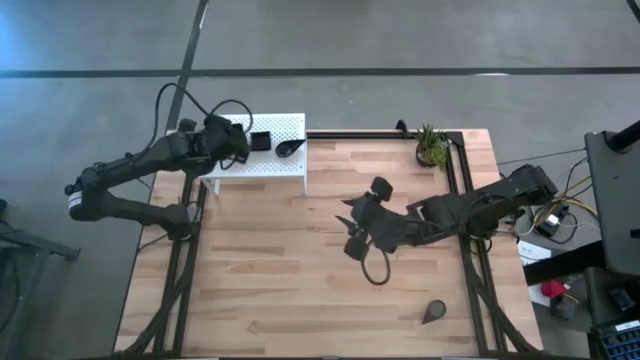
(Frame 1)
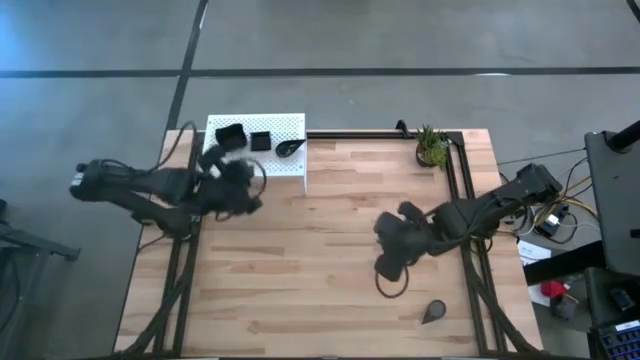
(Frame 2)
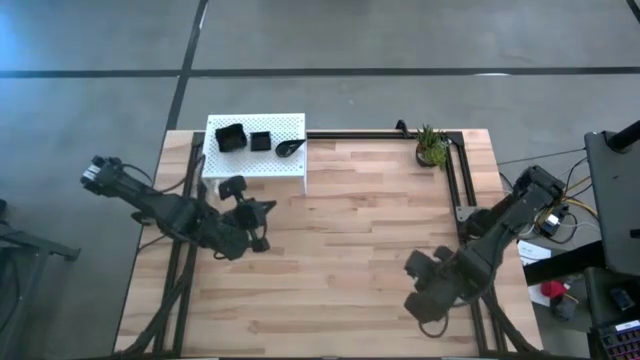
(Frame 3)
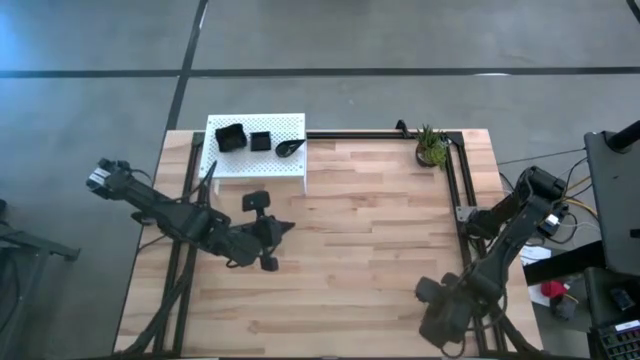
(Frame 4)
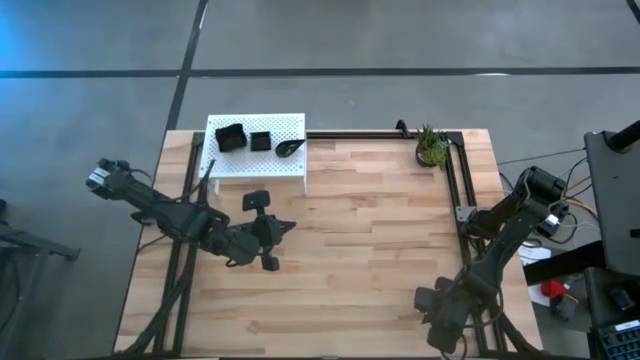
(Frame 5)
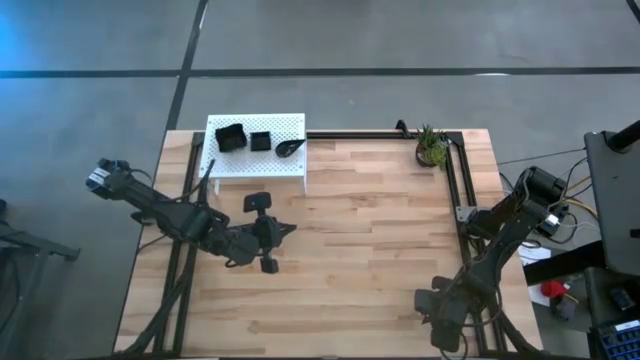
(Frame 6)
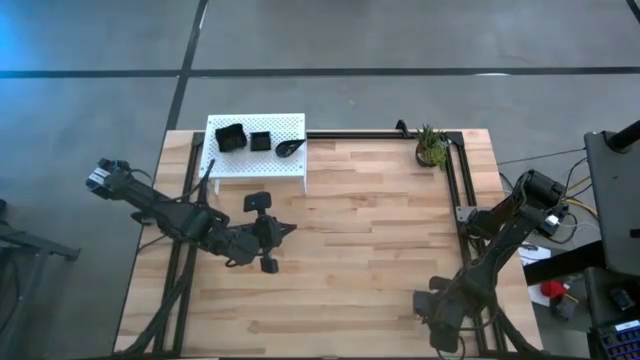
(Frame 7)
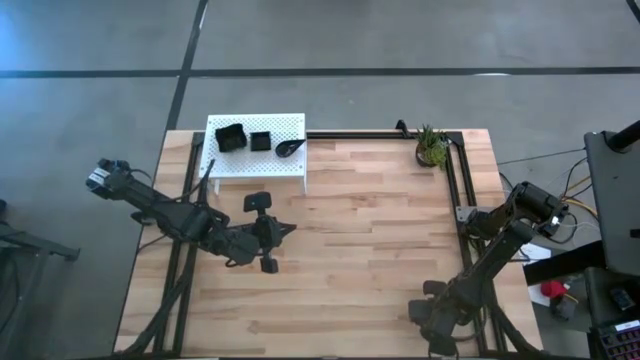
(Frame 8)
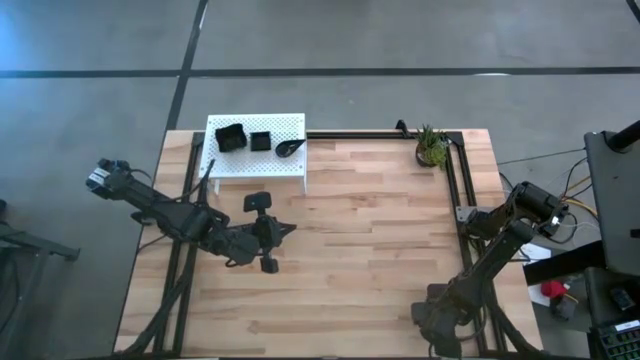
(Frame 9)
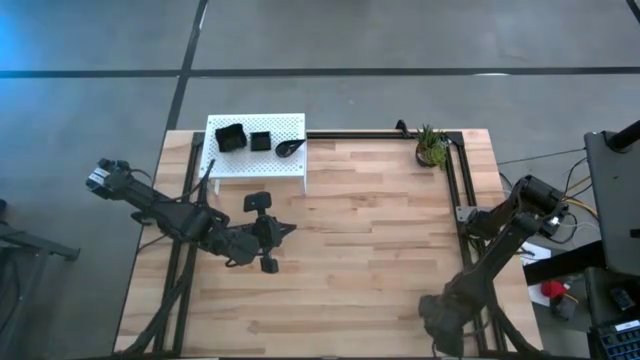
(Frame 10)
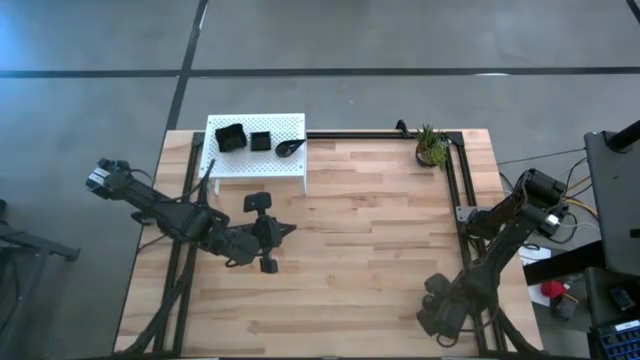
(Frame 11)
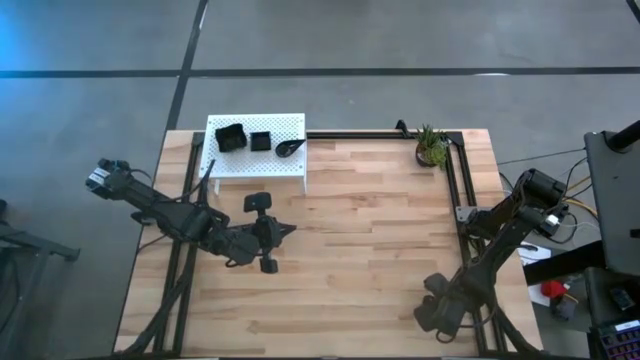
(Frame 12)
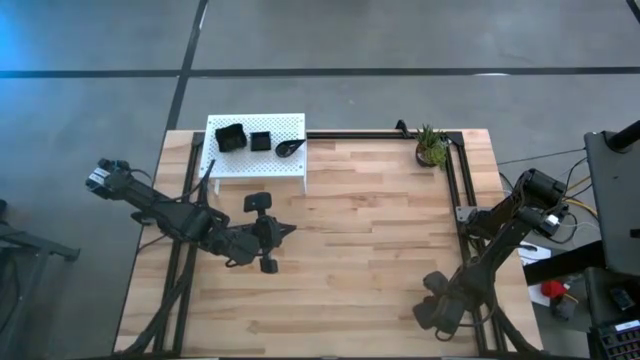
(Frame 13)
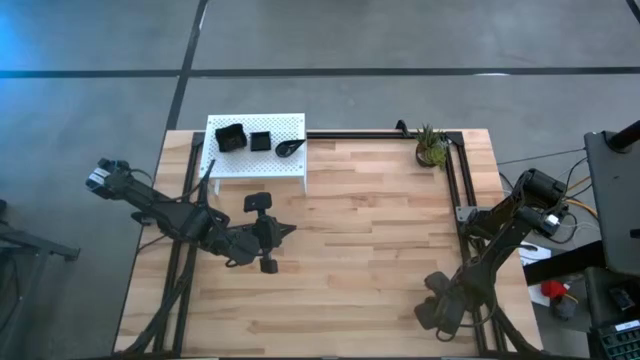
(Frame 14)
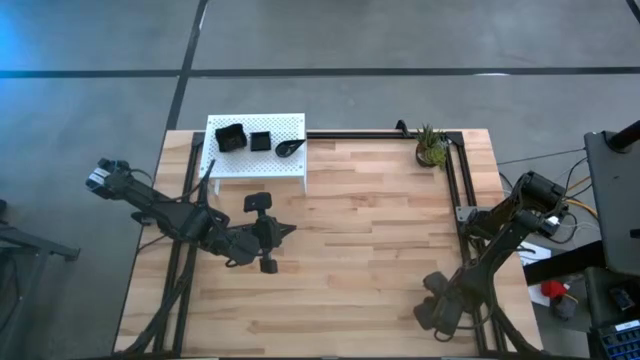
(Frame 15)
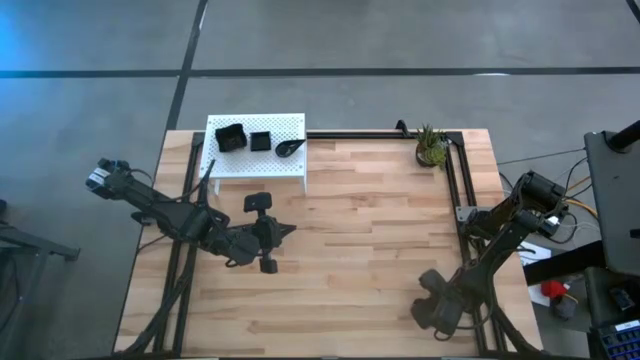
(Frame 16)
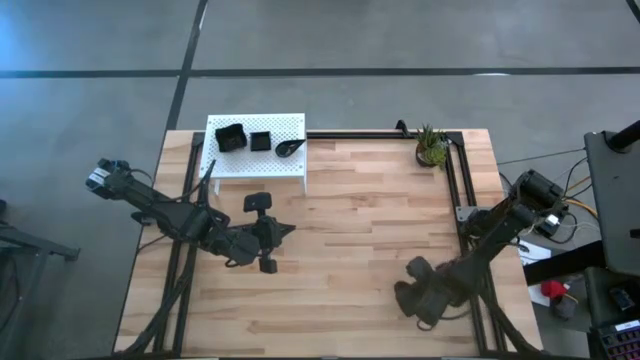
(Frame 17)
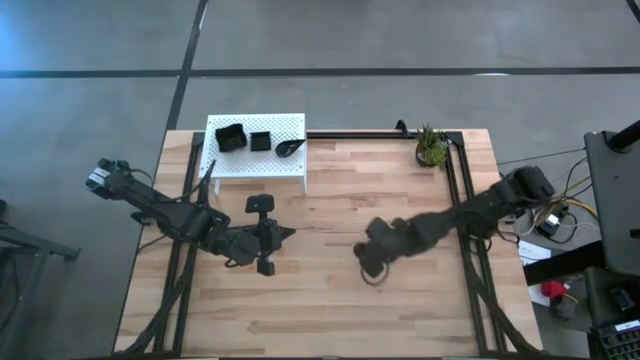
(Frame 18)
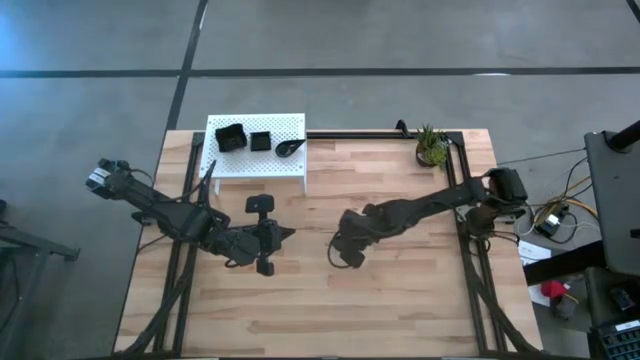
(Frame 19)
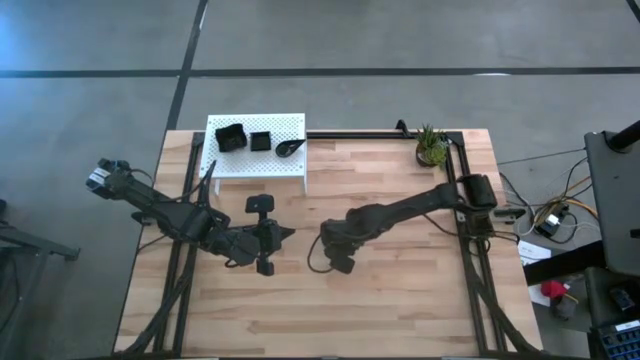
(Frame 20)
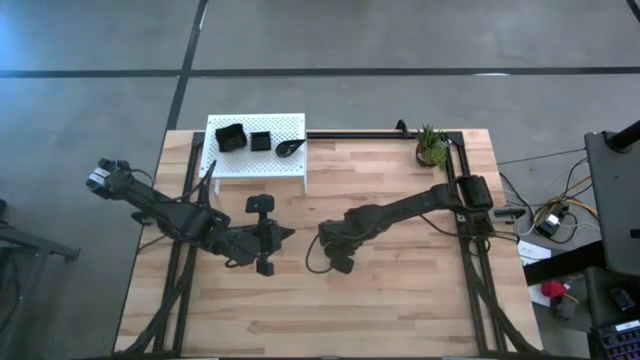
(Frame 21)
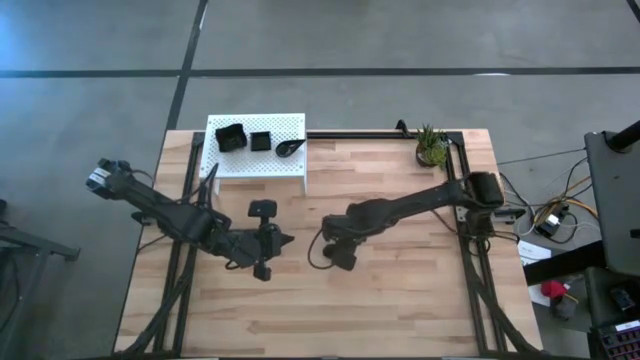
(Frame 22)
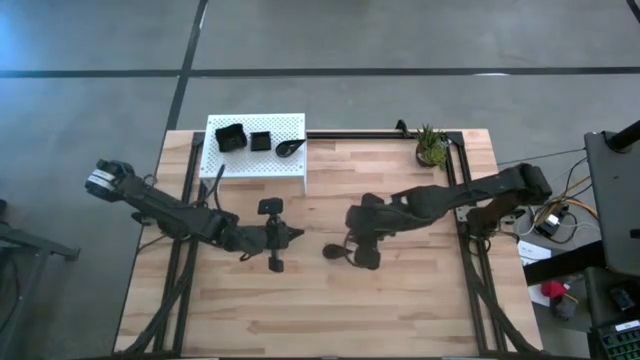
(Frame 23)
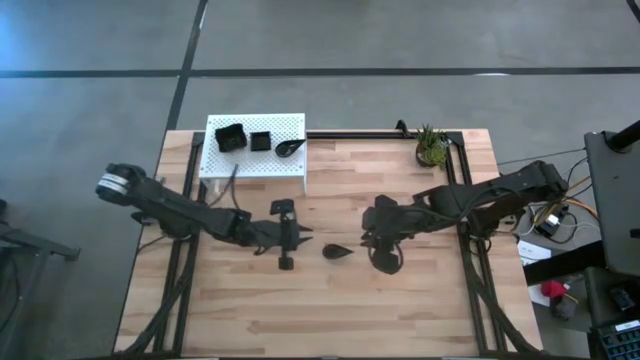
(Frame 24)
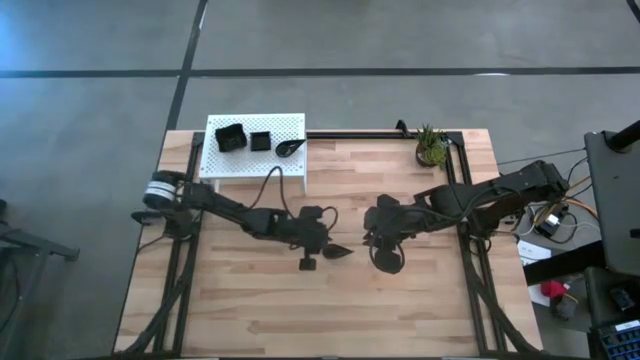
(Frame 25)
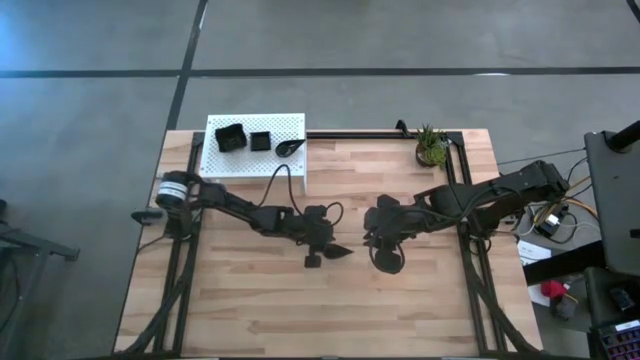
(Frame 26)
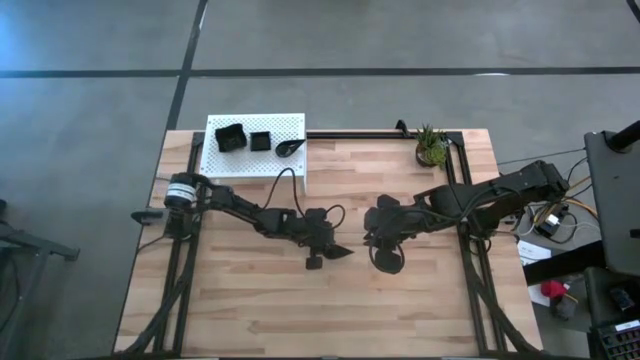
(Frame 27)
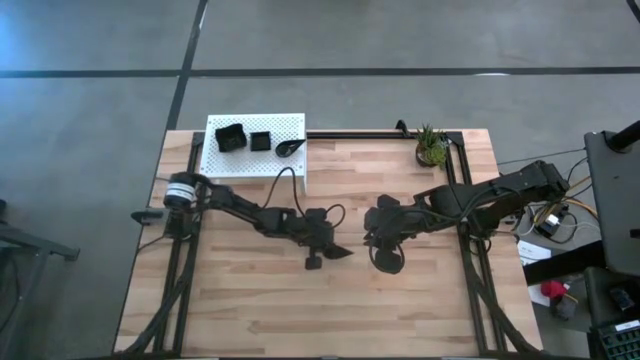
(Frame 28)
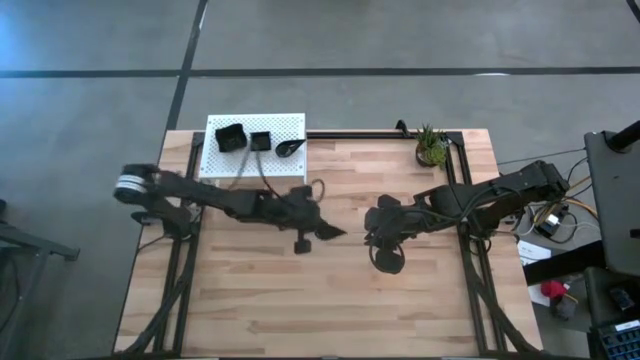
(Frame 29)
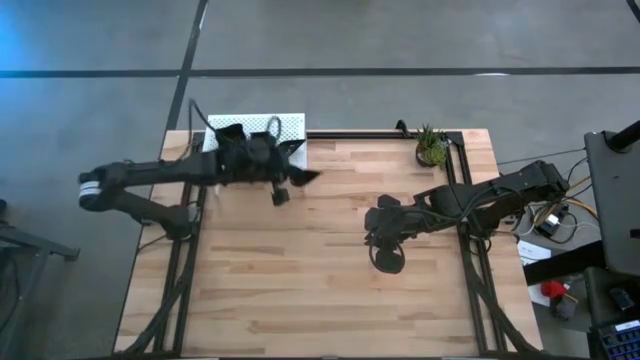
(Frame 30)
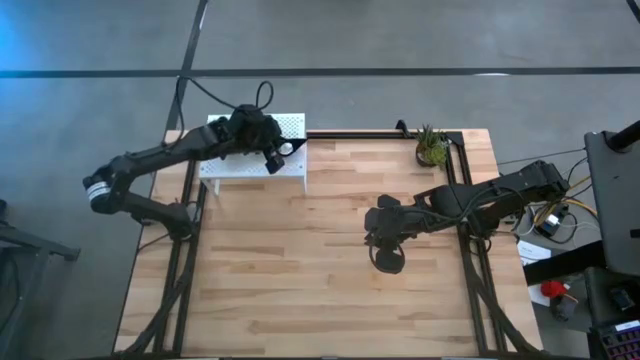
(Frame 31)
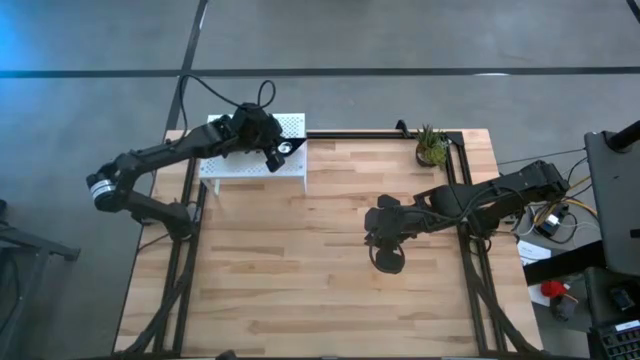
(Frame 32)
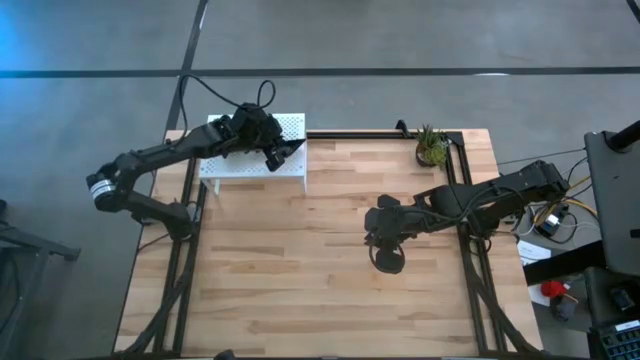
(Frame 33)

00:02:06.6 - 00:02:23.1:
Task: Pick & Place Mini shaped plates
Stack the drop shaped plate on top of the other drop shaped plate on the shelf

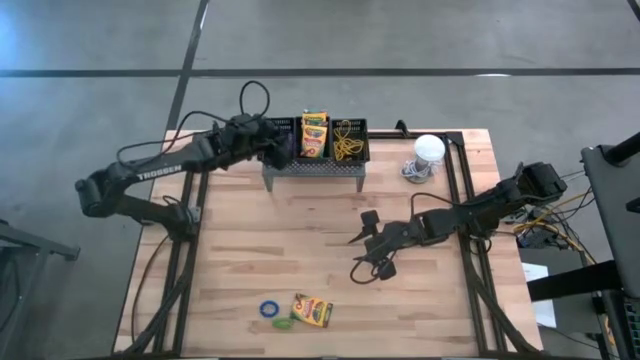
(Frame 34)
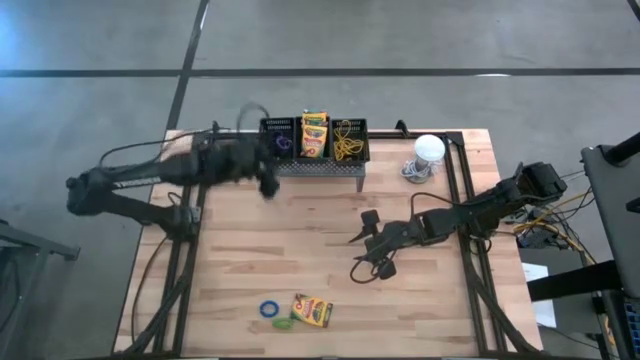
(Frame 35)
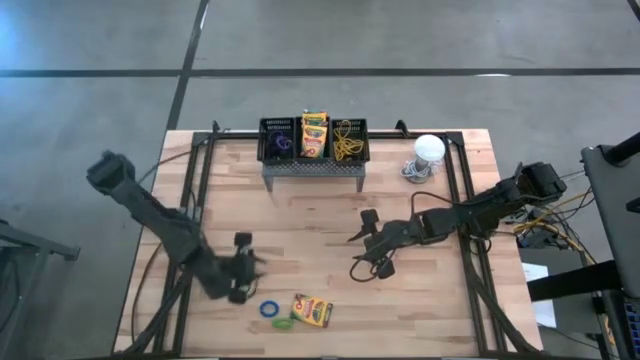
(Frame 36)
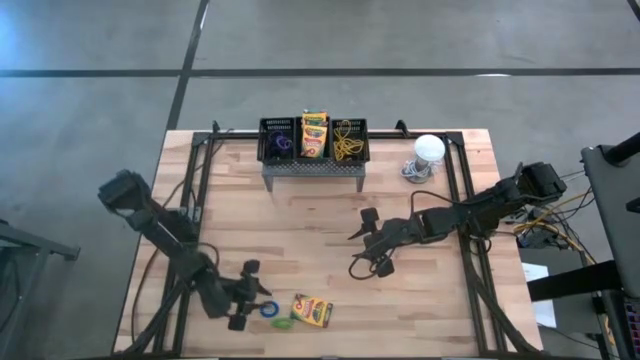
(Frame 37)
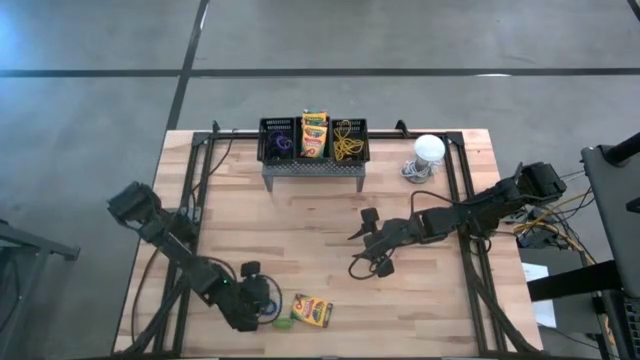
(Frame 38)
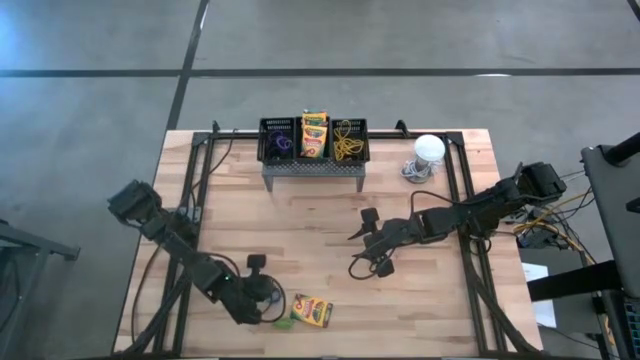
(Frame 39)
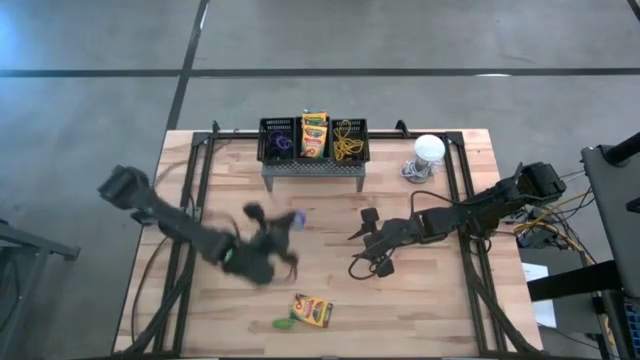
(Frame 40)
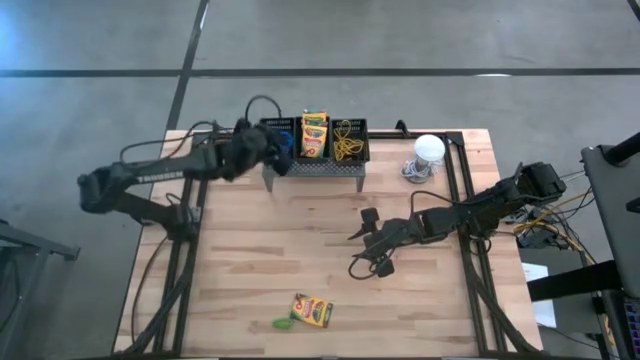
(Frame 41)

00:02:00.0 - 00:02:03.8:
Task: Pick & Place Office Desk Supplies
Put the blue spring keychain into the left black basket on the shelf
